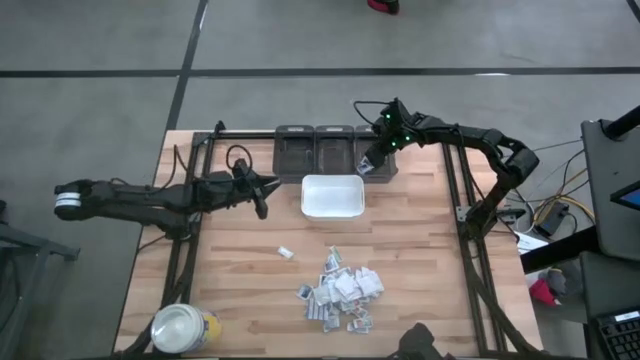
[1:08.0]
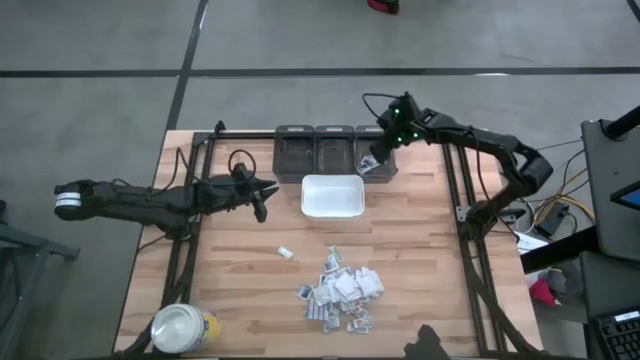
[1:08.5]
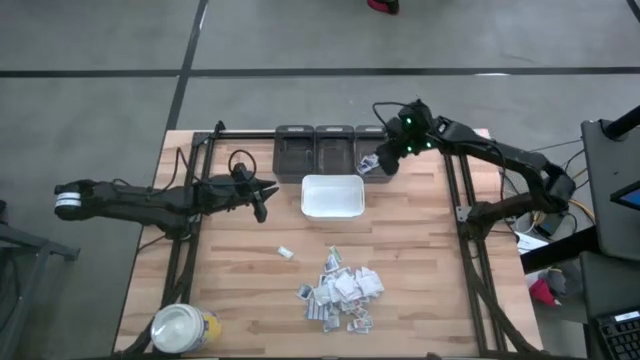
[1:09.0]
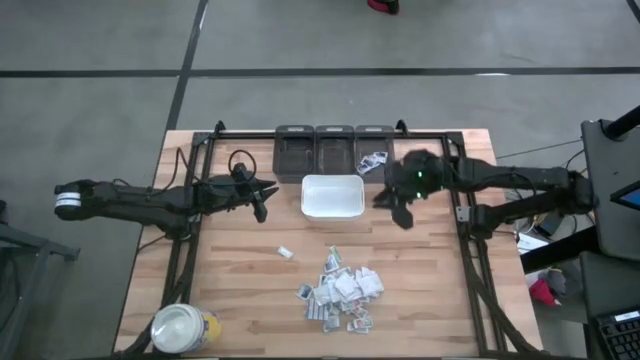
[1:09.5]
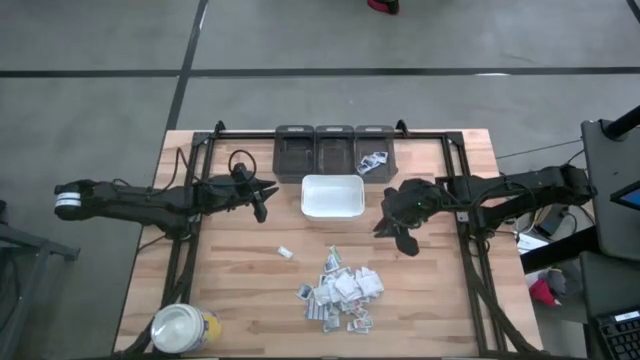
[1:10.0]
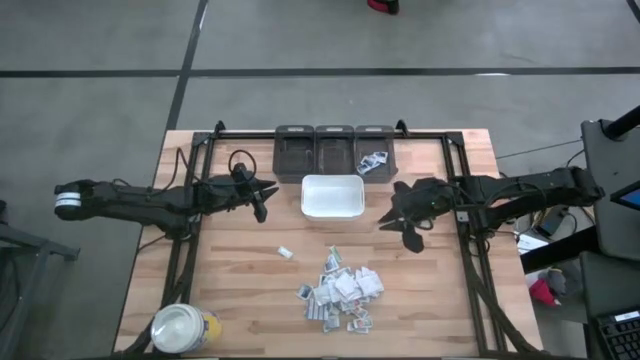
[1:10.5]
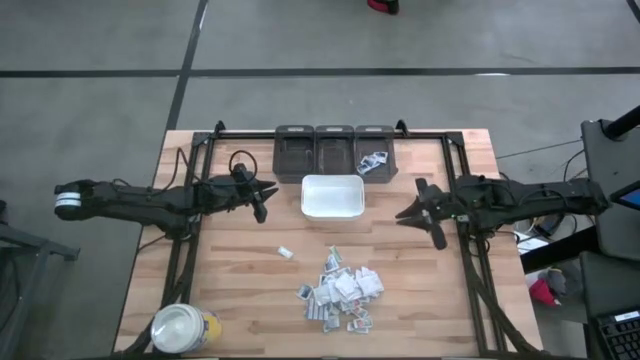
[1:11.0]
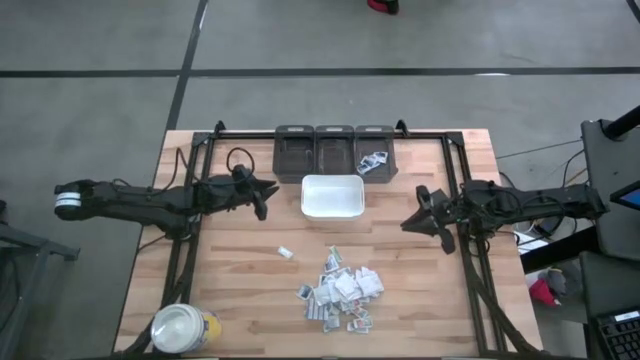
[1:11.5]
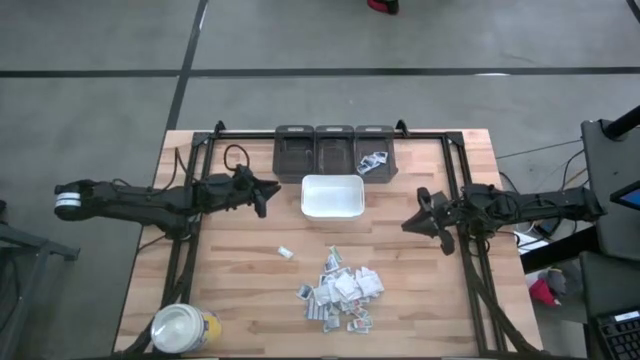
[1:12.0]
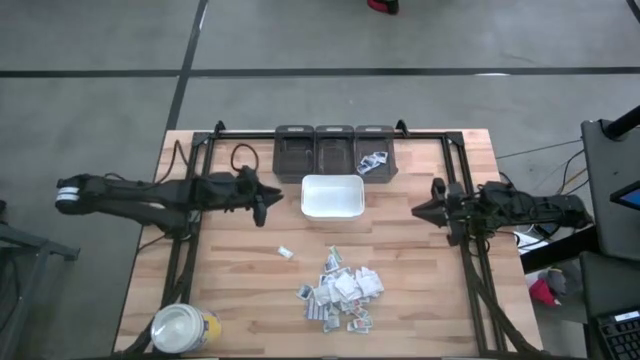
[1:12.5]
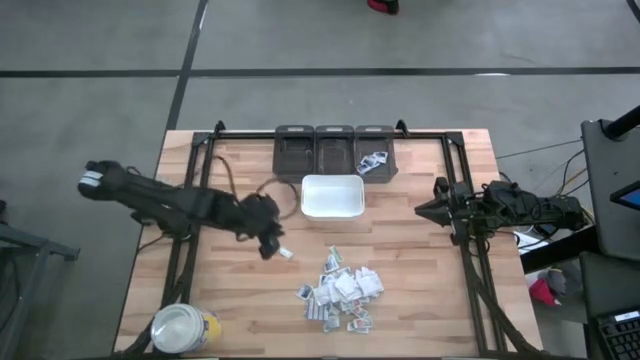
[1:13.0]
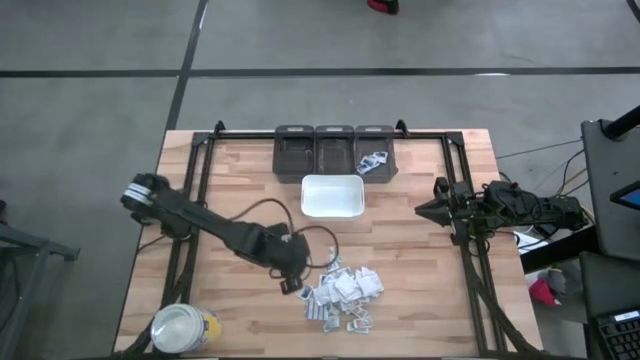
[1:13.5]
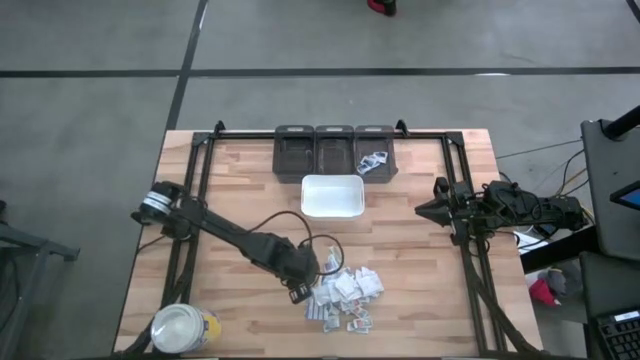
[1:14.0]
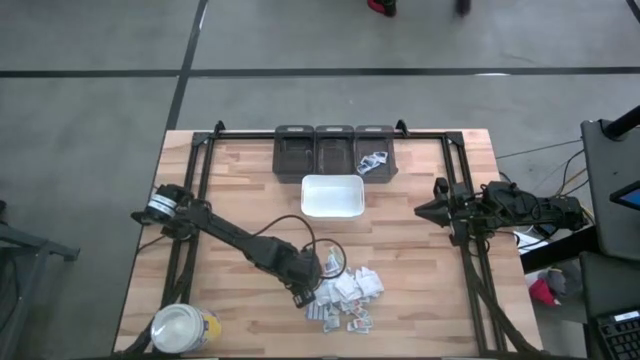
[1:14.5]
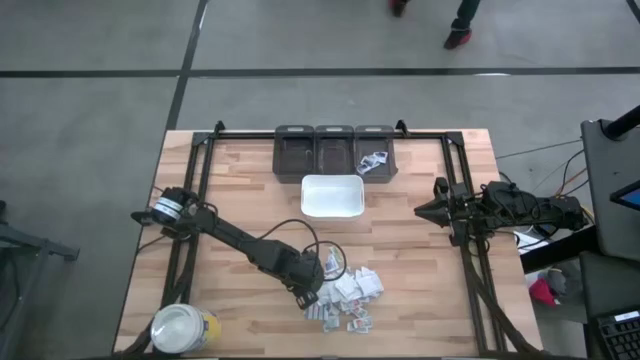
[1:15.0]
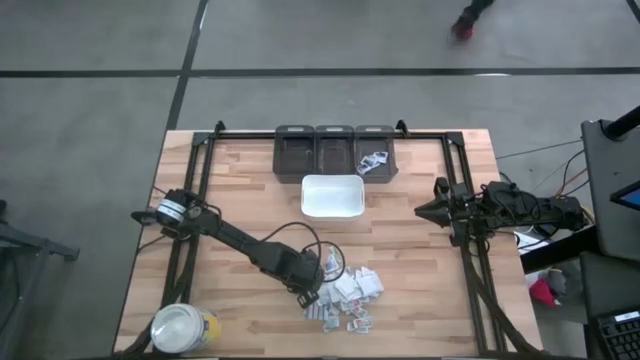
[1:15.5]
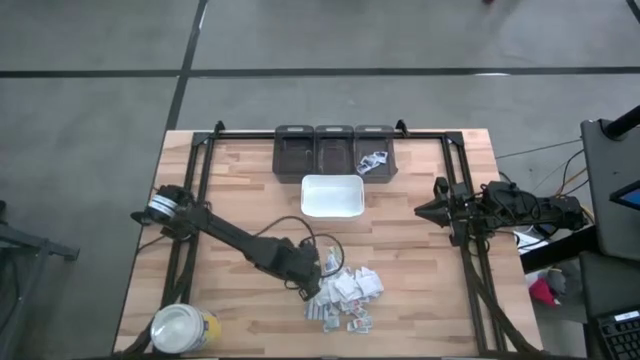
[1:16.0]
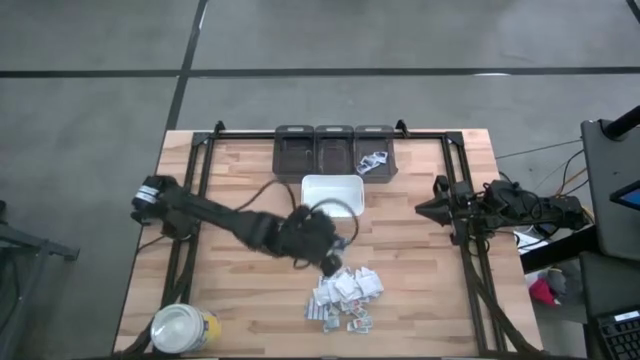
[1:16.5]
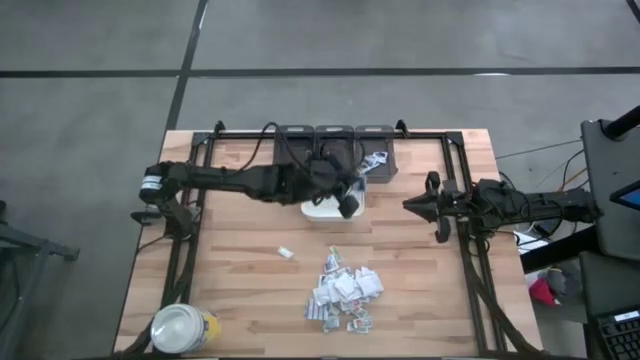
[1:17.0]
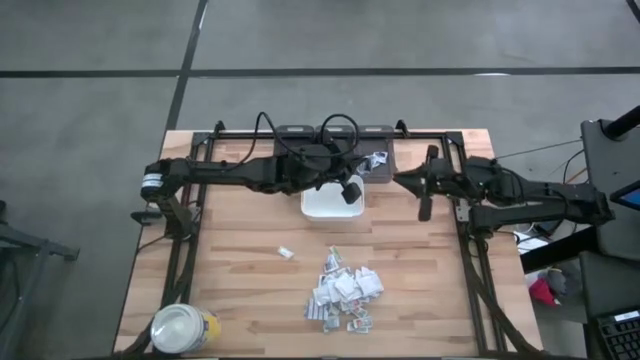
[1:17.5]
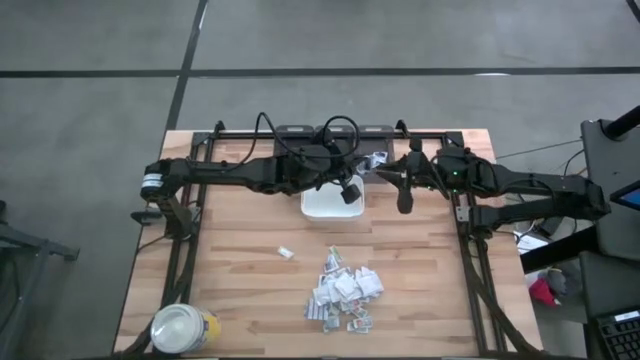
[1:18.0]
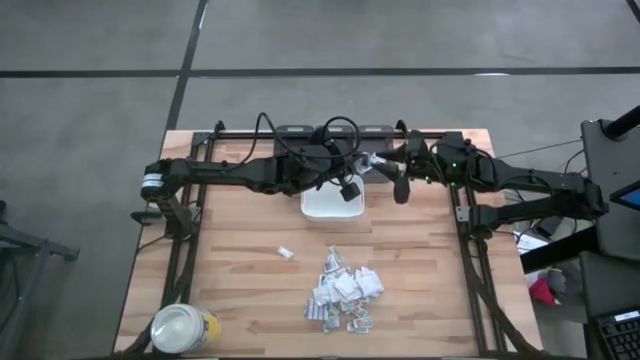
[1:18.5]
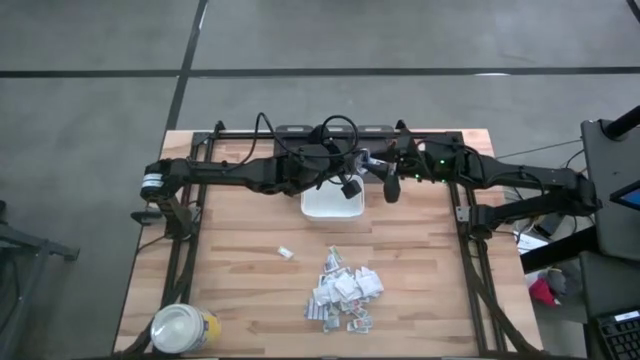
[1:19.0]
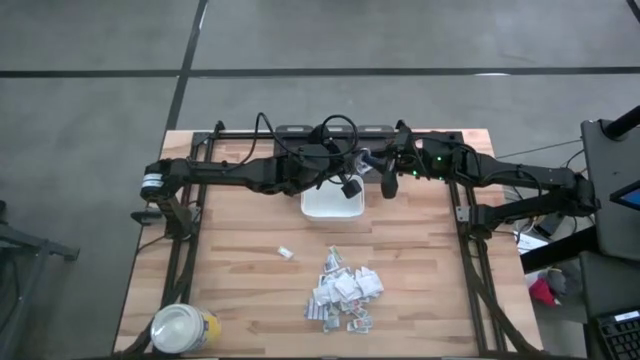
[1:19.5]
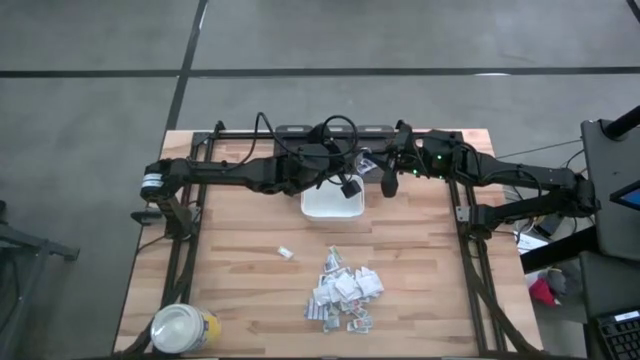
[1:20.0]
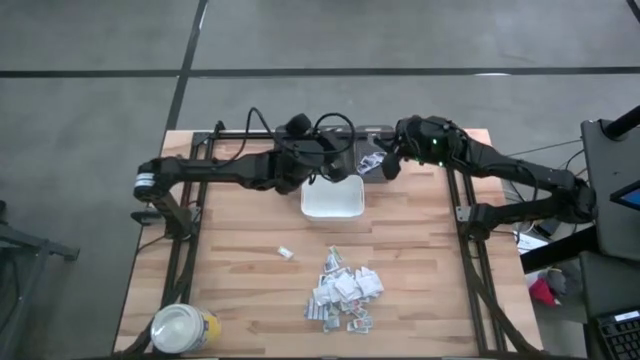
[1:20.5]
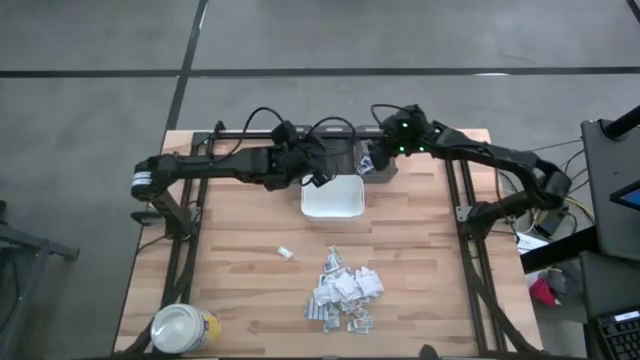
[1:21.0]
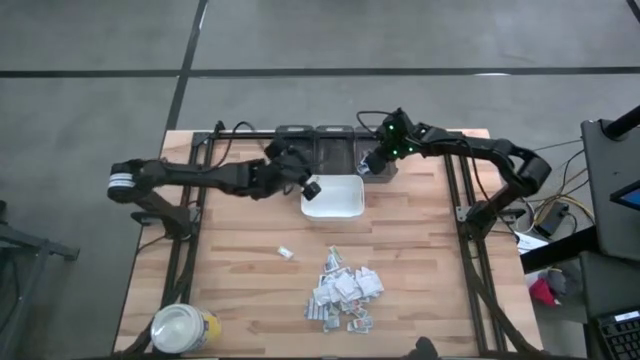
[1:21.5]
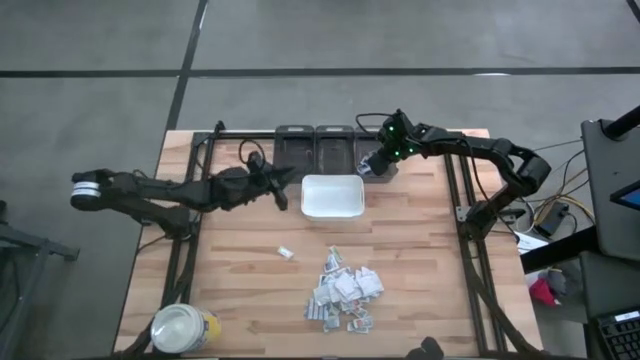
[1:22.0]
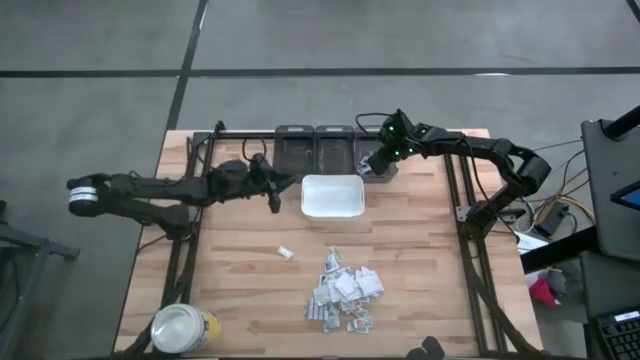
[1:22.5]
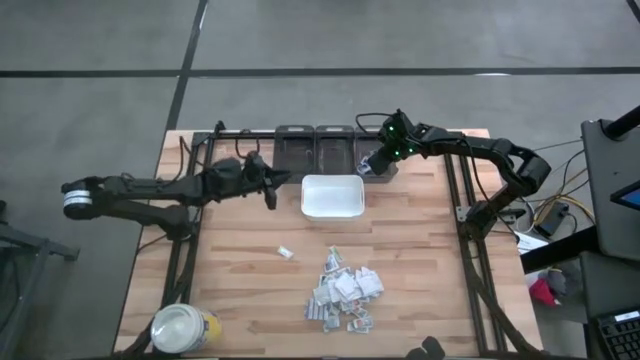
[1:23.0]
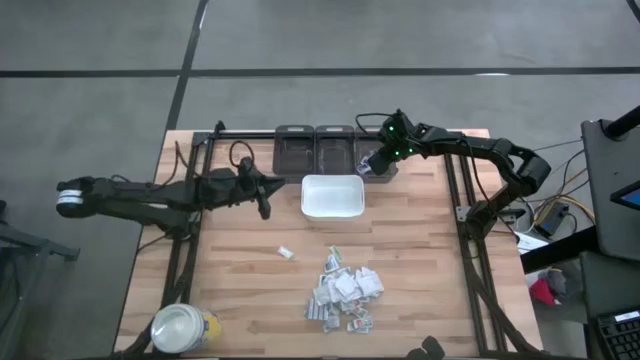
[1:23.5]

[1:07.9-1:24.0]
Task: Pick & Place First Aid Supplies
Put the white alcohol pad into the right black bin
